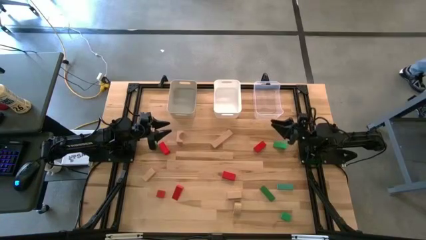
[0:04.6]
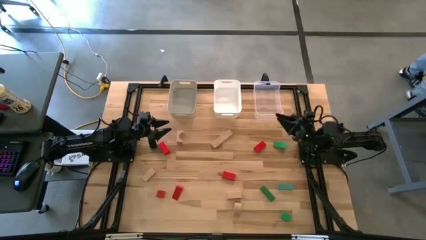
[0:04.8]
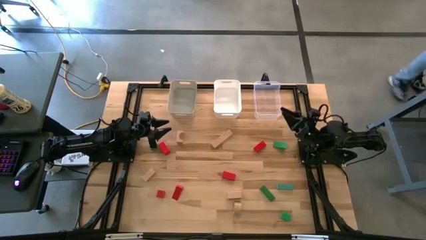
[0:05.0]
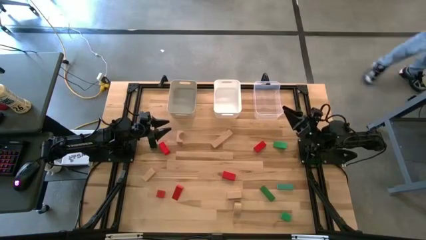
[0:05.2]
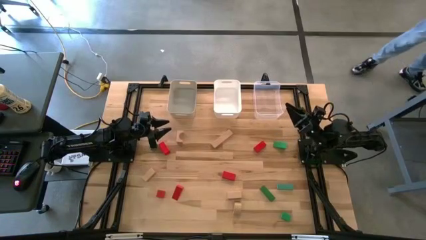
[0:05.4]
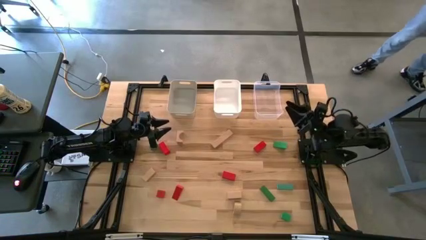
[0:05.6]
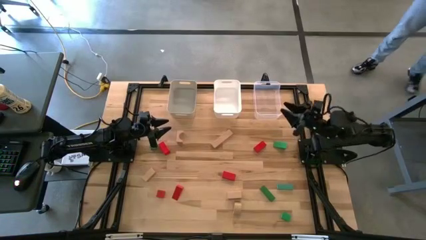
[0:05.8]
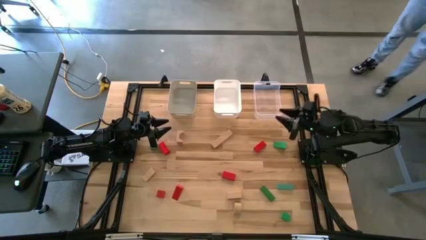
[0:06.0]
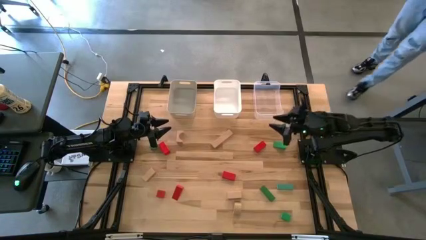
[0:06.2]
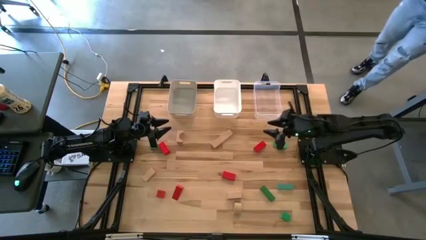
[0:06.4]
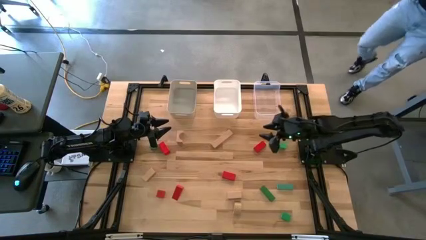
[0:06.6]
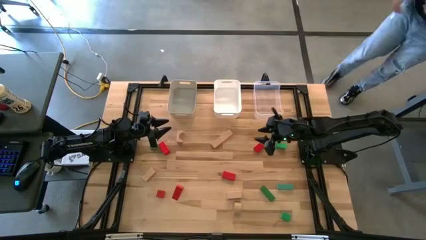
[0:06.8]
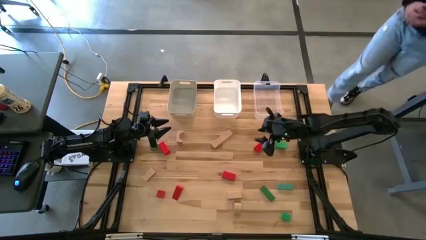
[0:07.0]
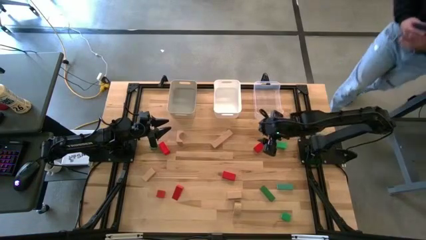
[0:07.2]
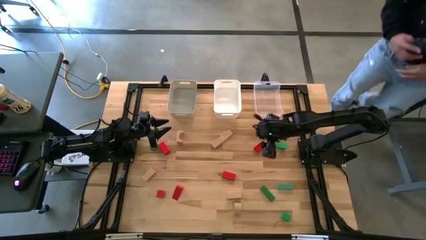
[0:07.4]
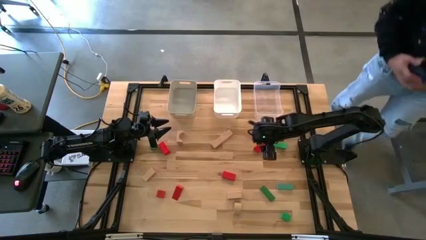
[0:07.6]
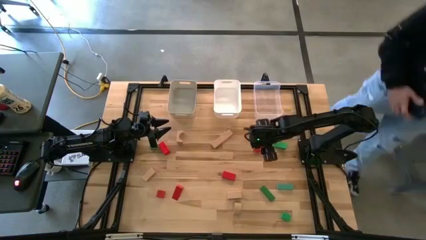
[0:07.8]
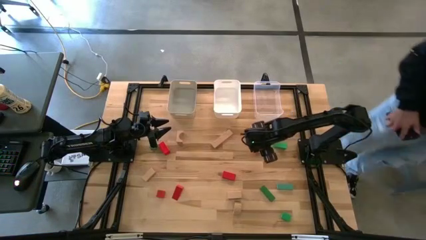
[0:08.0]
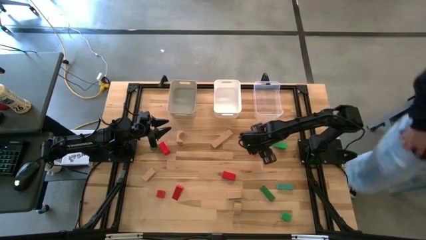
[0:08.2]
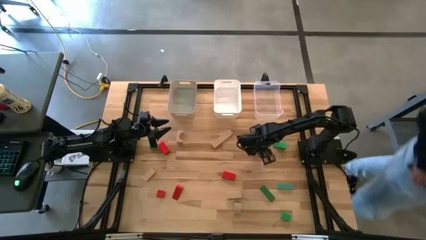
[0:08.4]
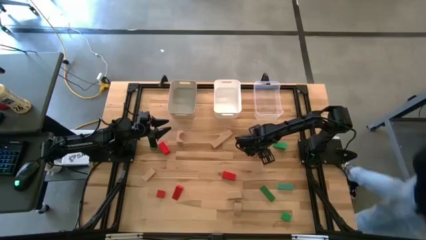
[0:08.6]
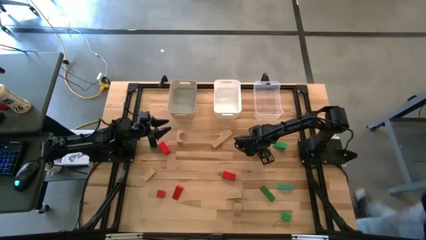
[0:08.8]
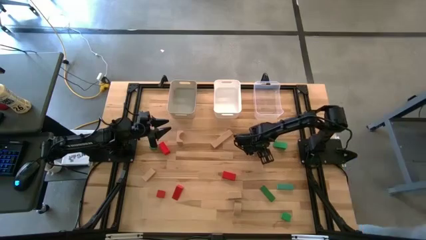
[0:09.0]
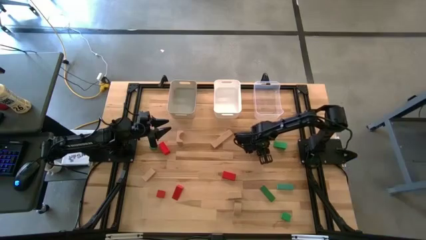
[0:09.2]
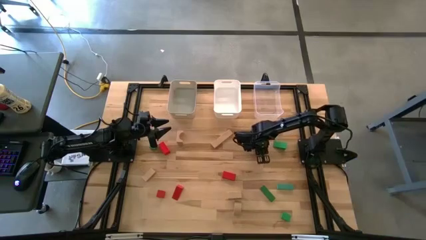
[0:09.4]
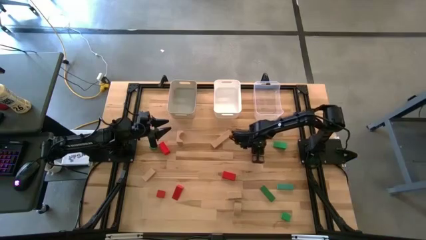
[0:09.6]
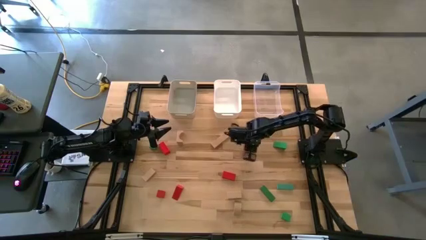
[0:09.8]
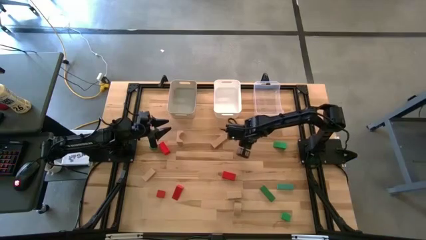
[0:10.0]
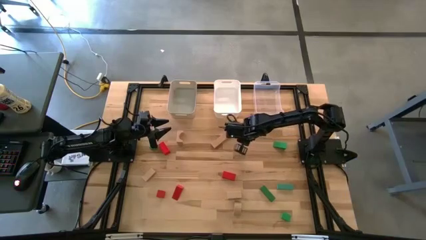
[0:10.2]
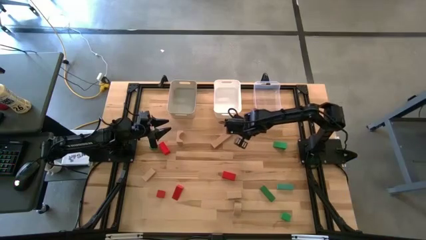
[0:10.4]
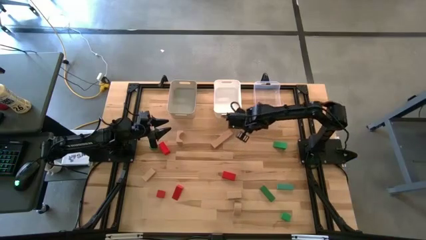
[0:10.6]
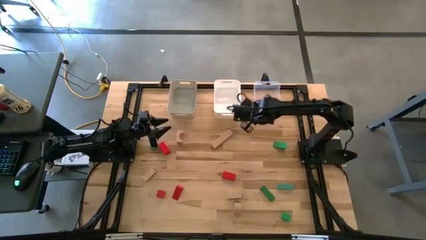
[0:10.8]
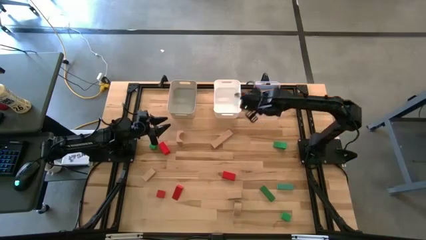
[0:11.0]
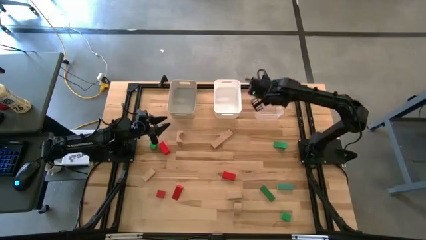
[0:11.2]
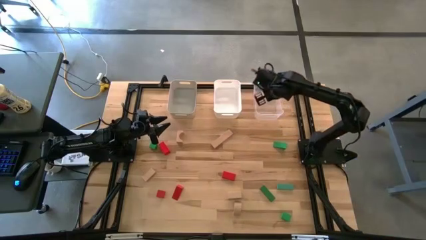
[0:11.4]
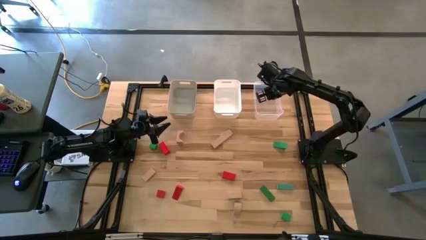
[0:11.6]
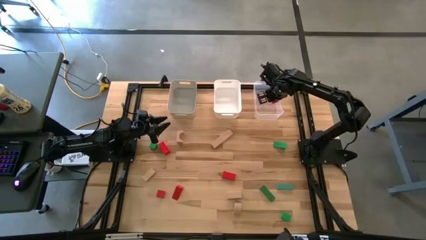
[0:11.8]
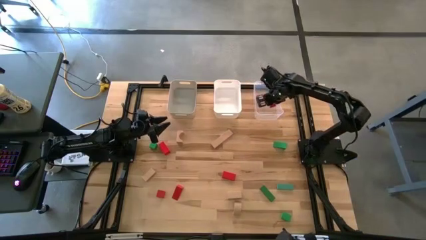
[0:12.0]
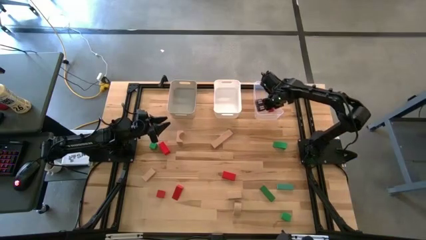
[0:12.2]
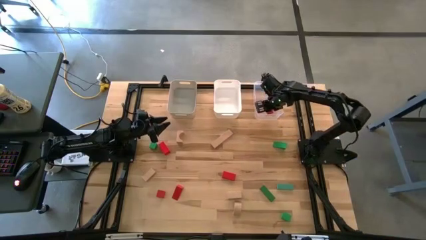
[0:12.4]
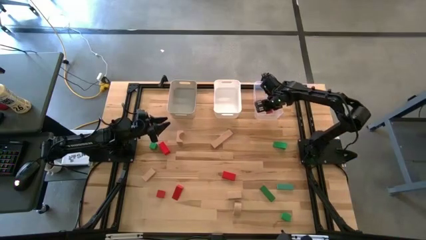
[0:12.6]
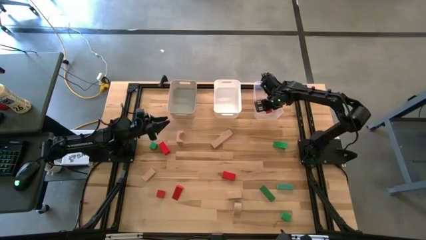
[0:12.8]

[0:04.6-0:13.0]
Task: Sort & place blocks by color
Put the red block into the transparent bin

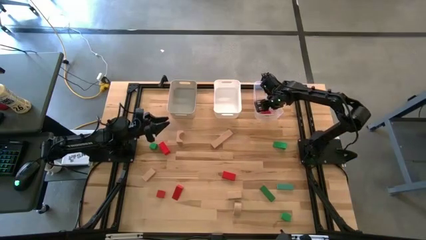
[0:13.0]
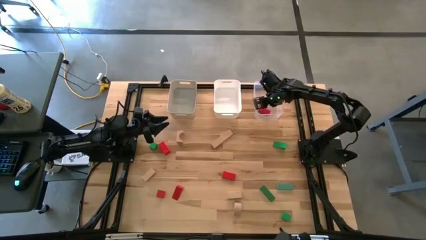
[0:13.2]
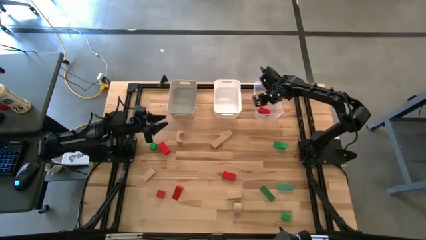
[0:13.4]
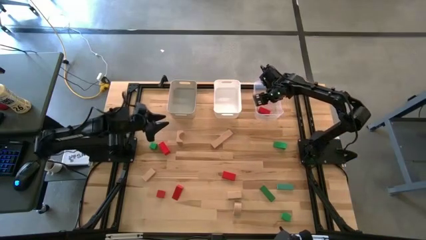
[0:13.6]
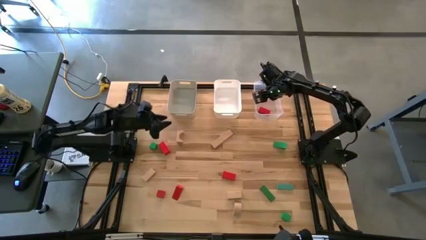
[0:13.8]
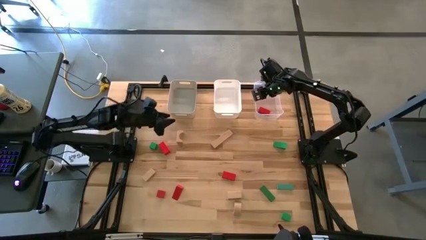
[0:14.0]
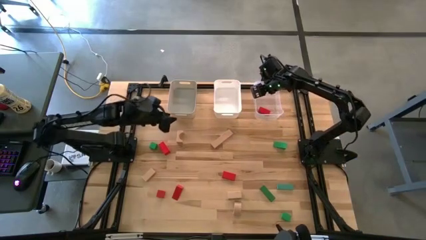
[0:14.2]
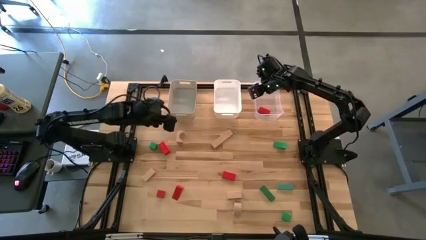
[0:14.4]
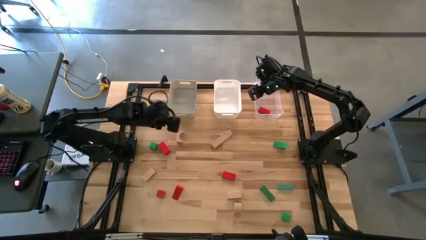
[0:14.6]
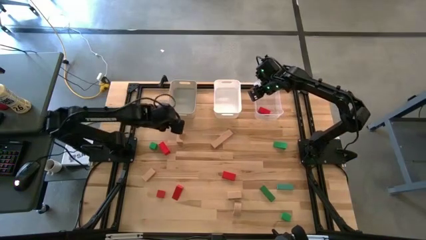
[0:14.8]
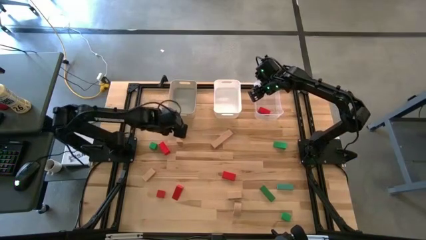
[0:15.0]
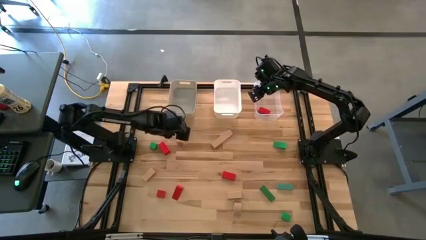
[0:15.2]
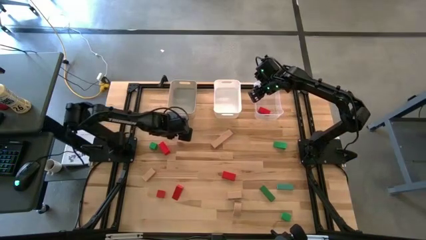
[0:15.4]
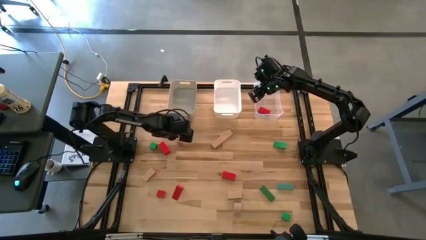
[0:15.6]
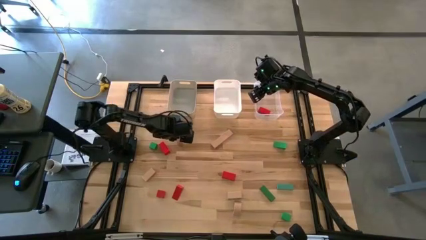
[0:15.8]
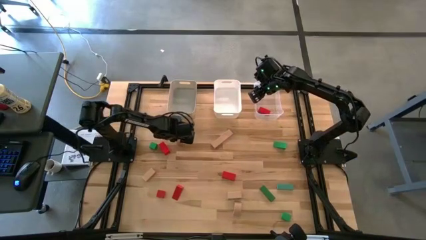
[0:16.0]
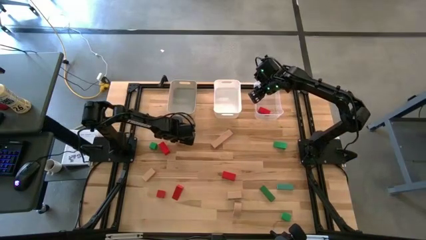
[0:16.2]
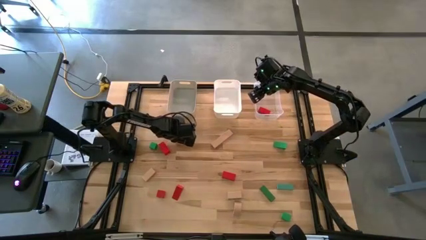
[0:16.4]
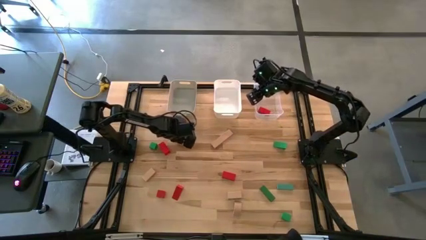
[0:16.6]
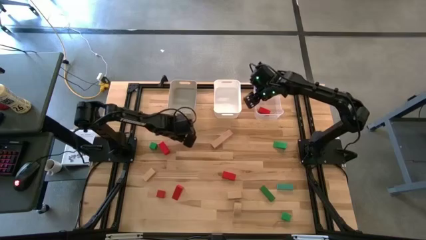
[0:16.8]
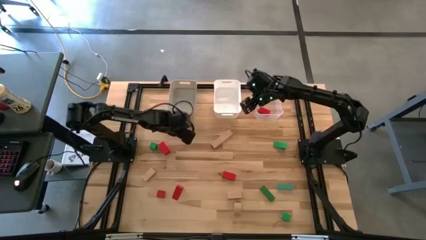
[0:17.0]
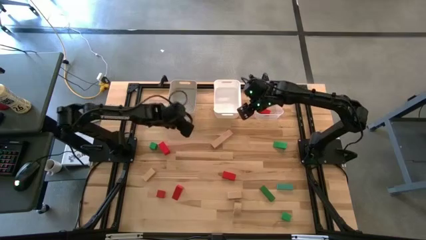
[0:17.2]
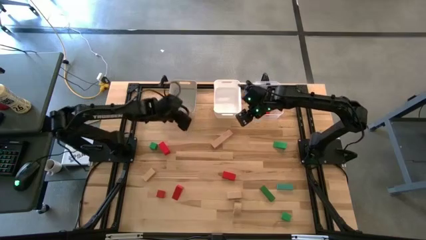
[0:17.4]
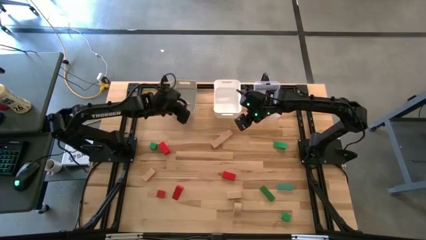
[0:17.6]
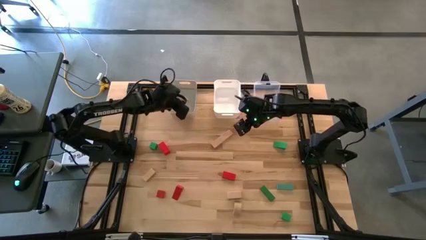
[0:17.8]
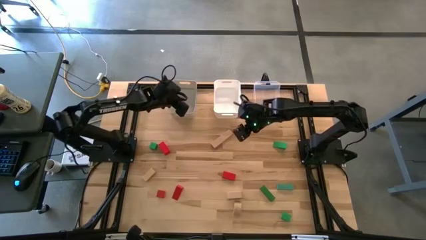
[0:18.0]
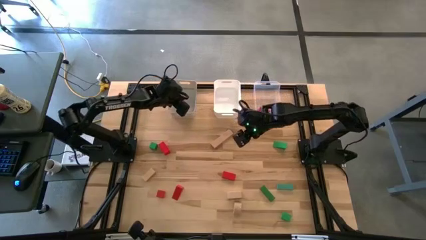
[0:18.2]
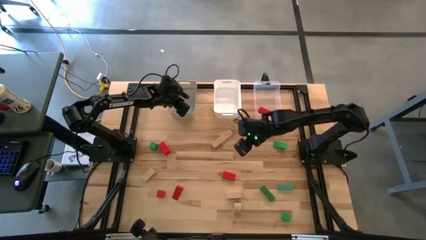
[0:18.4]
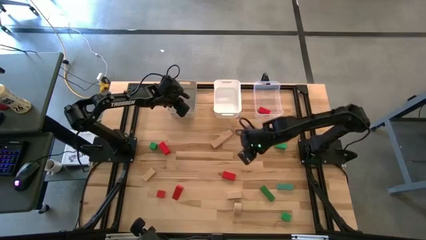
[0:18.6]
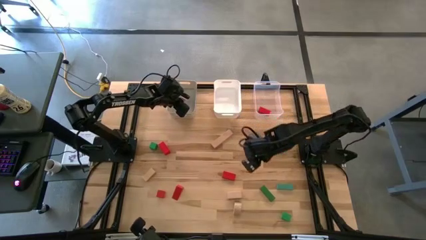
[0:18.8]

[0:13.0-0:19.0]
Put the brown arch block into the gray bin

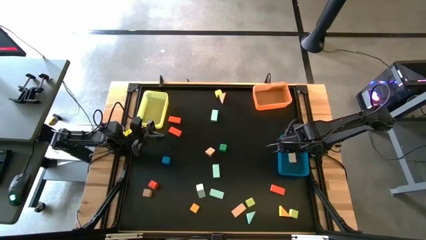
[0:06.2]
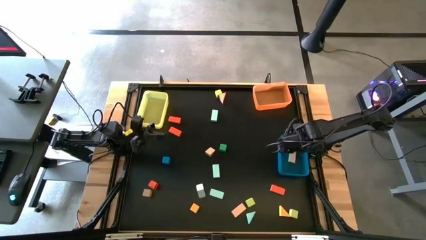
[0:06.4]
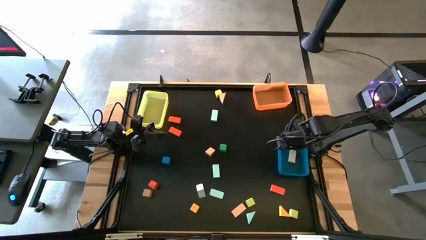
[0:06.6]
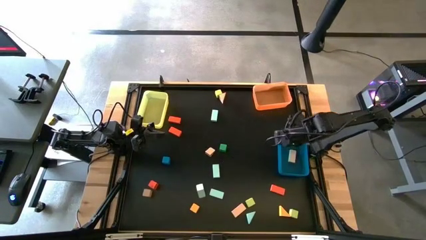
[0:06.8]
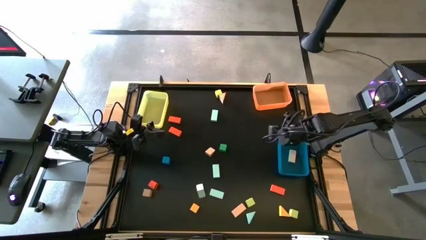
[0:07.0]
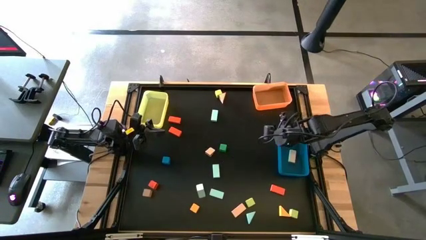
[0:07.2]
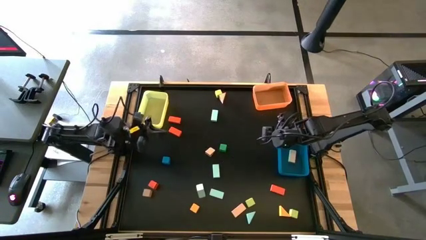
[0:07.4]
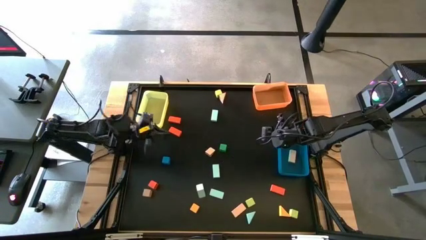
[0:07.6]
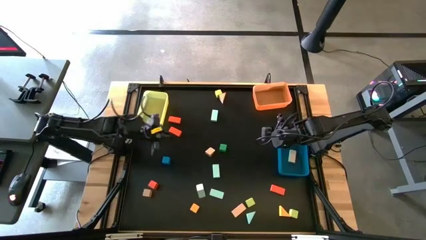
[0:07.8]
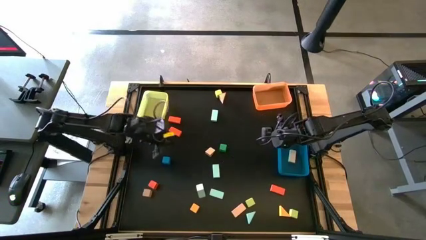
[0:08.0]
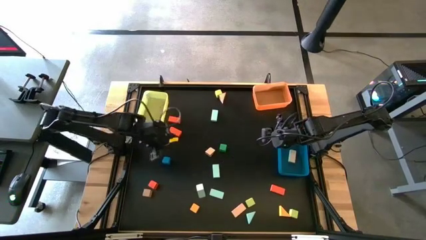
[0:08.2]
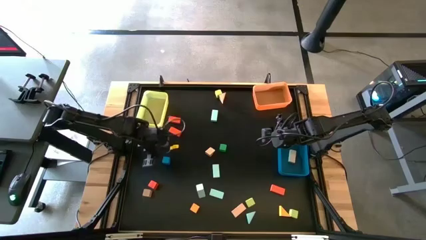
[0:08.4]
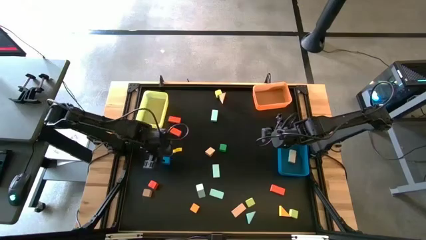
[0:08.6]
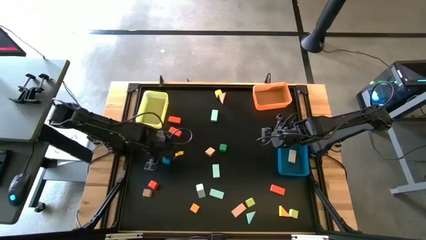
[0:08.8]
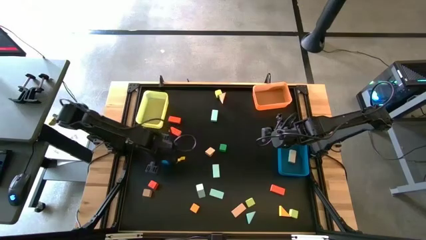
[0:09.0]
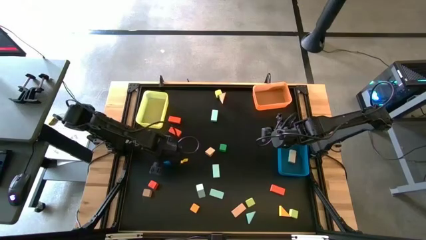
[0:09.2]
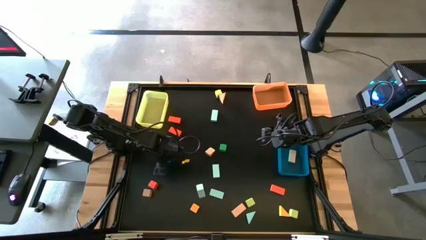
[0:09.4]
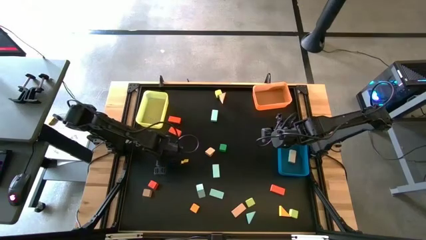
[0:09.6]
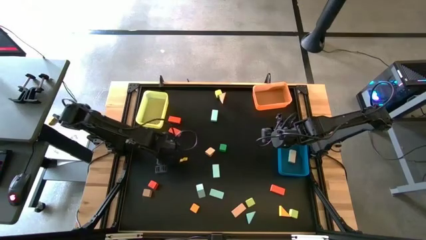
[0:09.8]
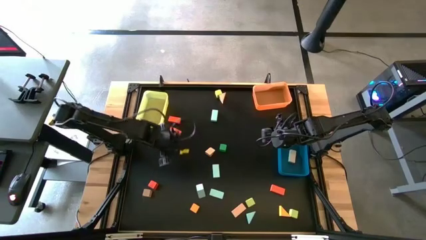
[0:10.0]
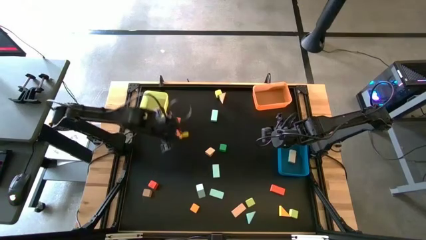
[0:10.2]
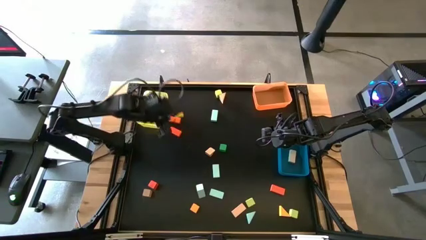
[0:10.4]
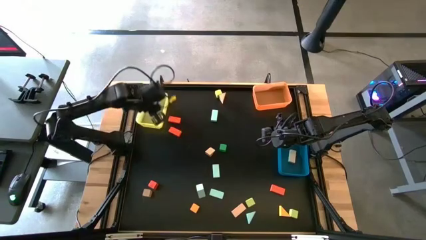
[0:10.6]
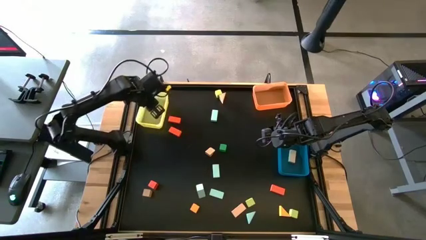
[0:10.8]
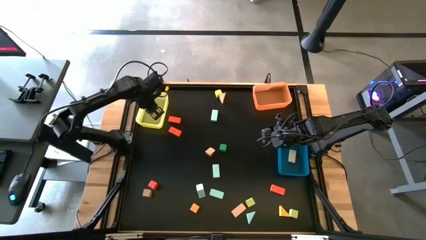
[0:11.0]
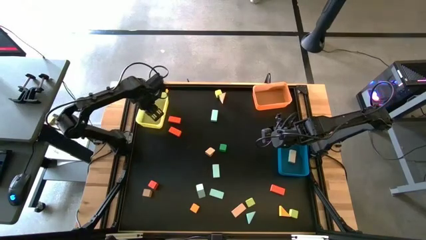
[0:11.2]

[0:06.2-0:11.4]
Task: Sort blocks by size
Put the blue square block into the yellow bin
